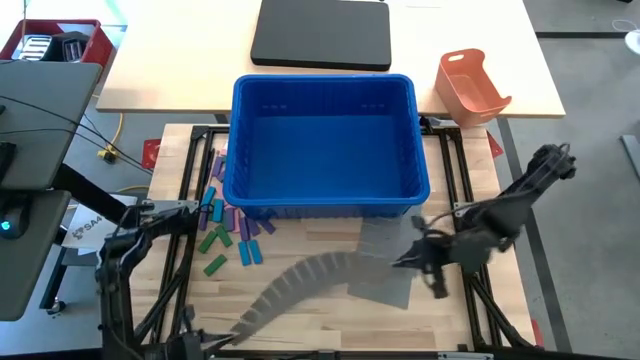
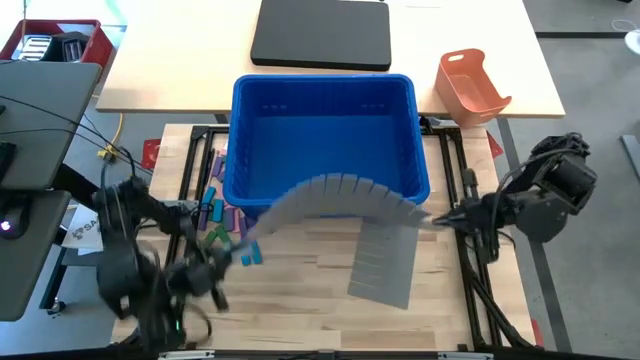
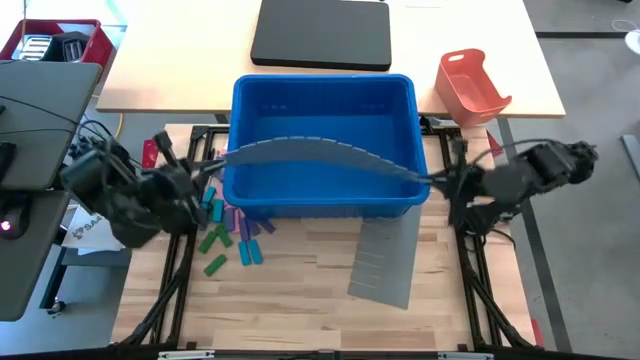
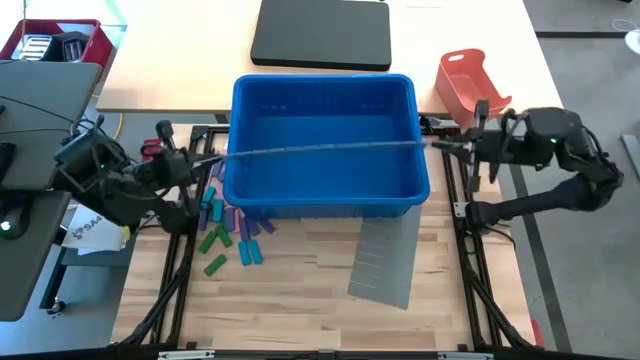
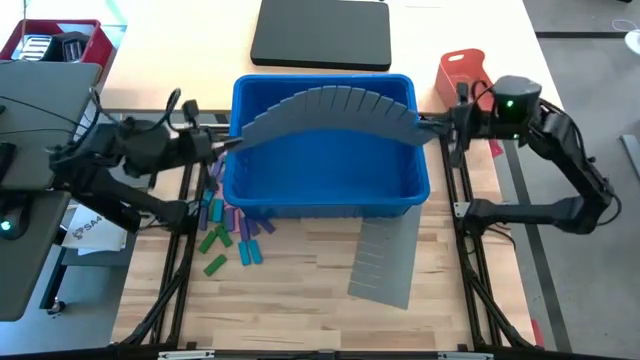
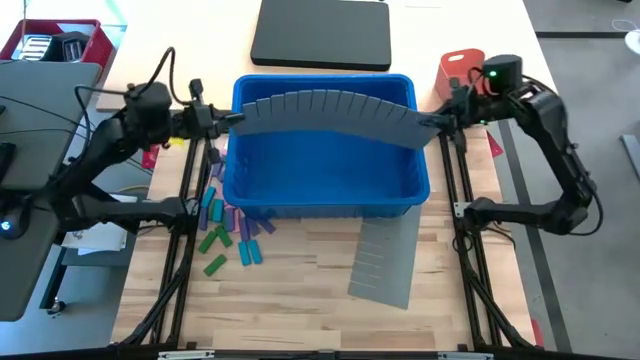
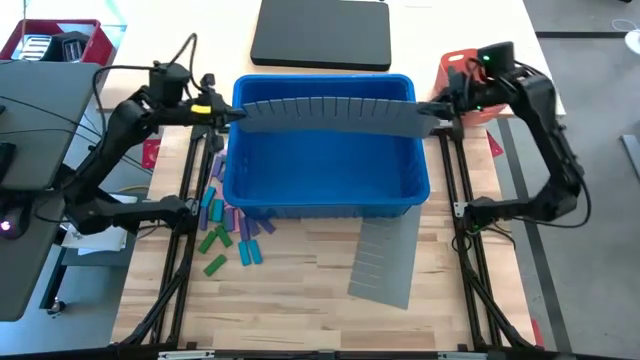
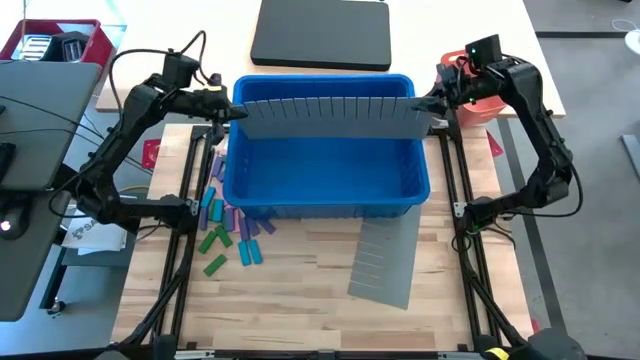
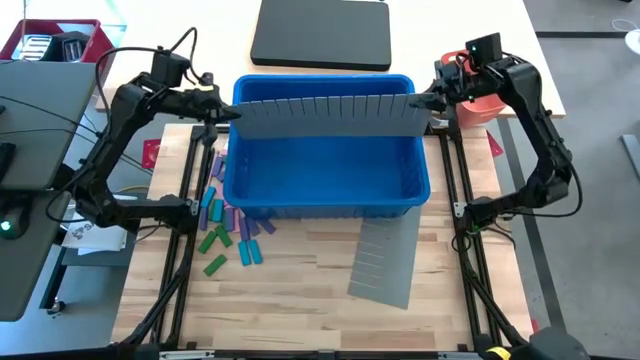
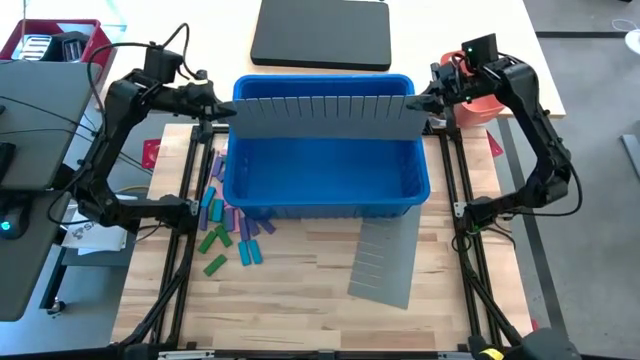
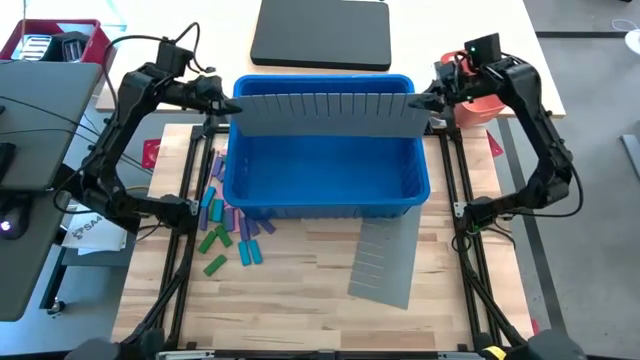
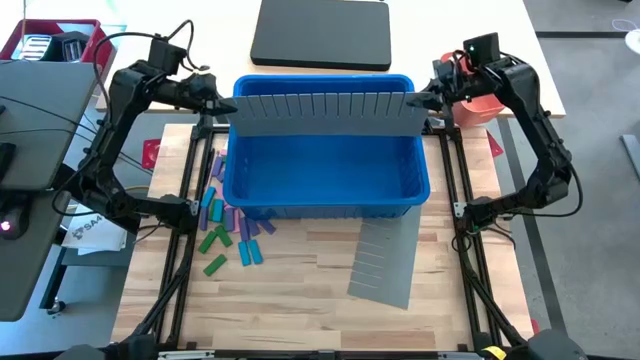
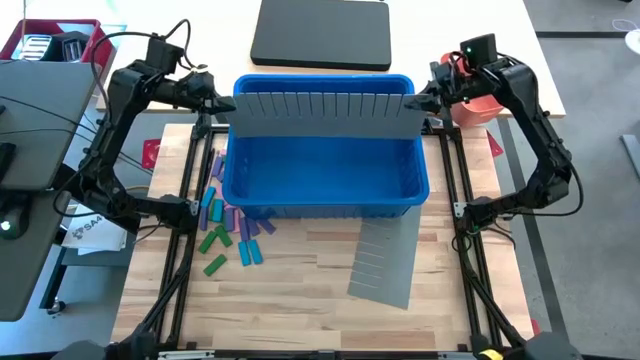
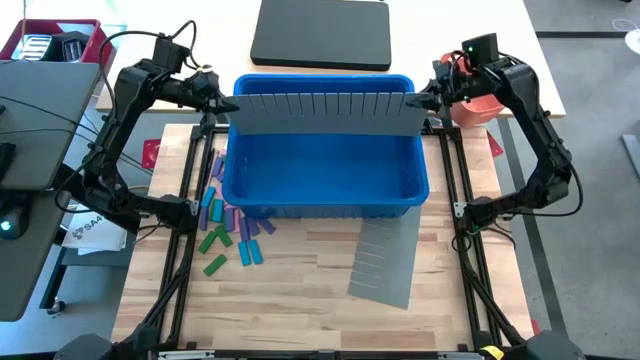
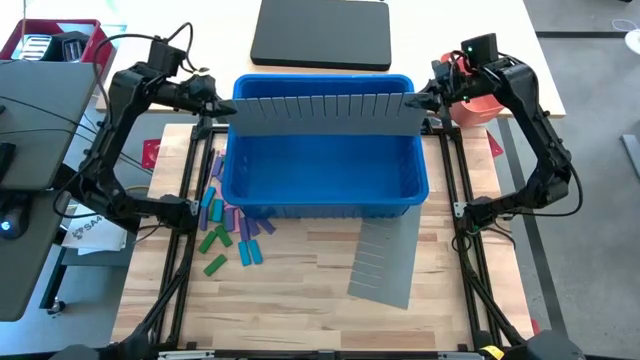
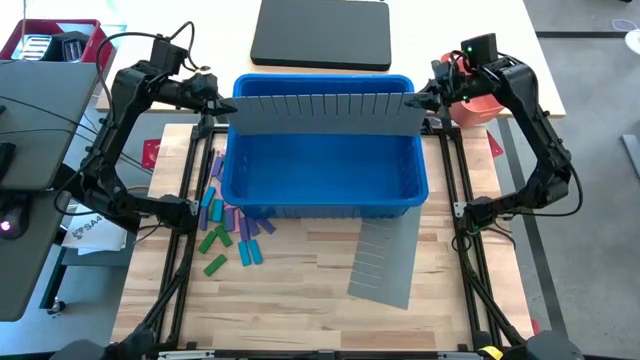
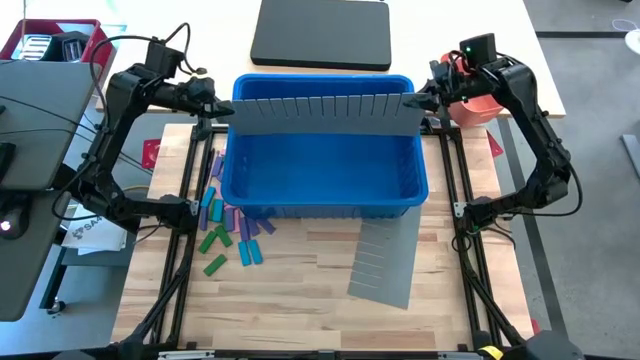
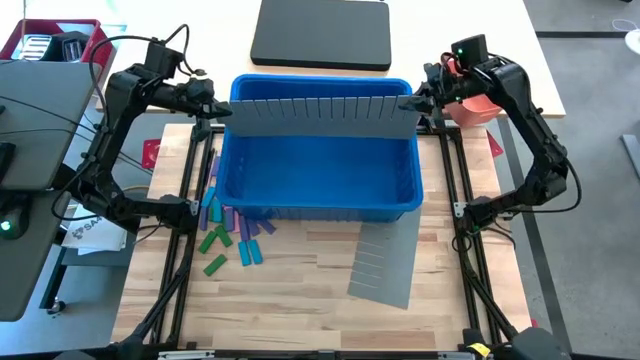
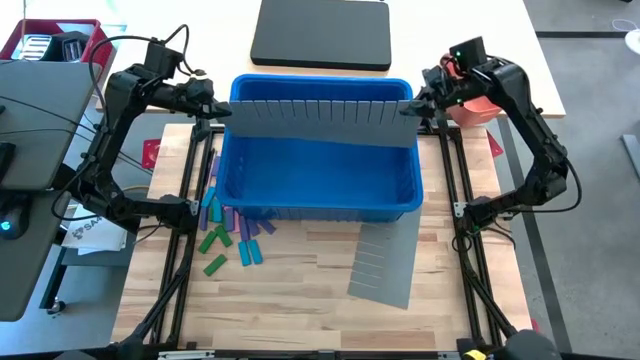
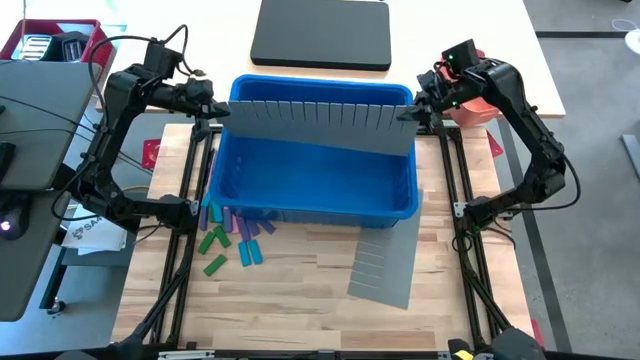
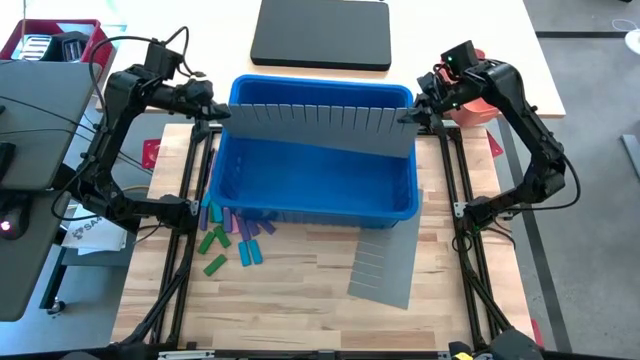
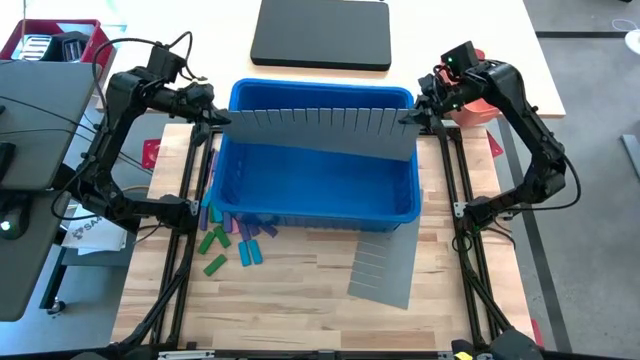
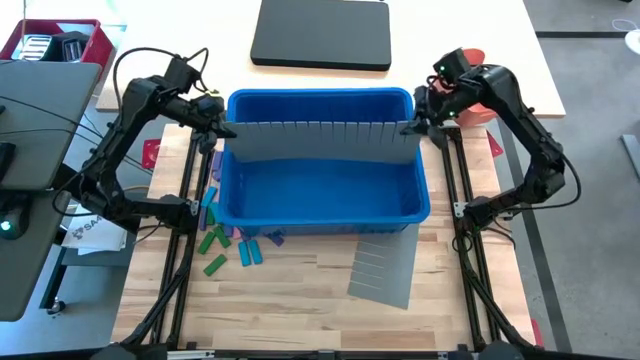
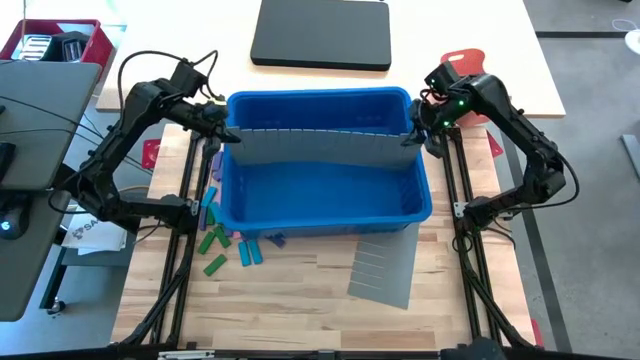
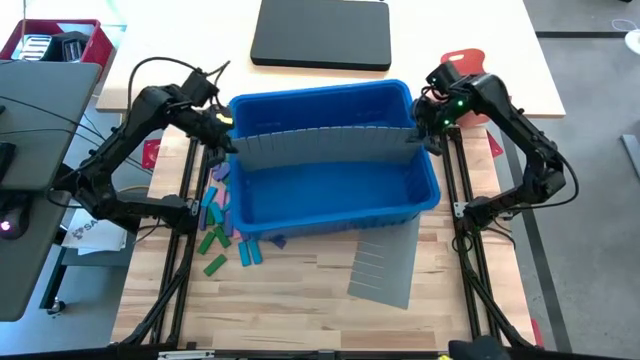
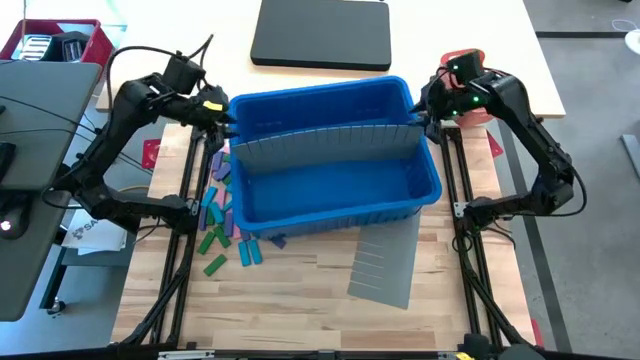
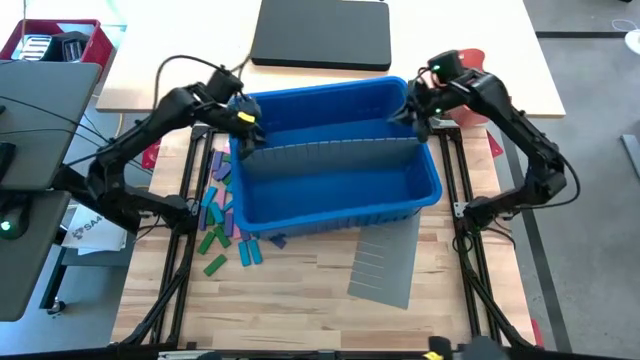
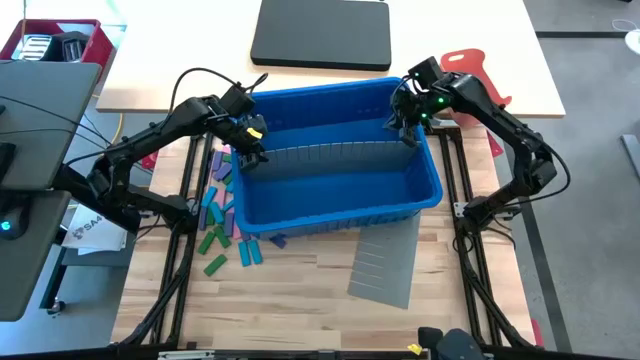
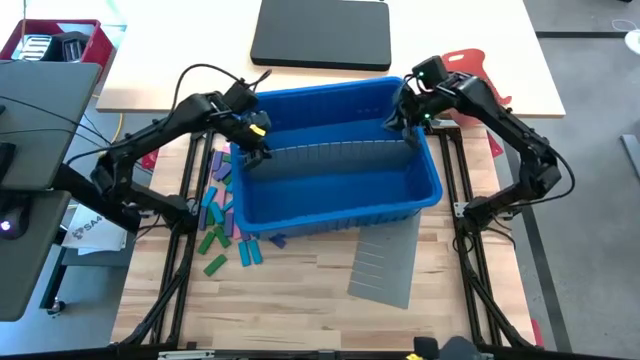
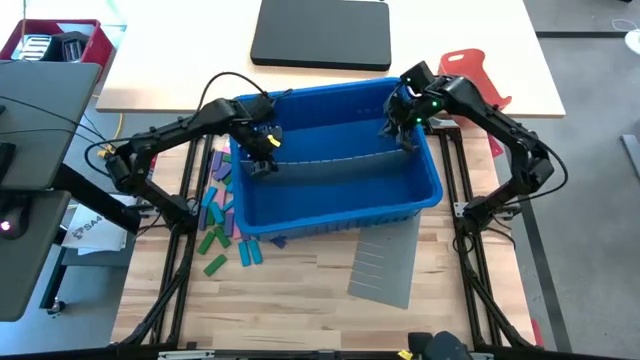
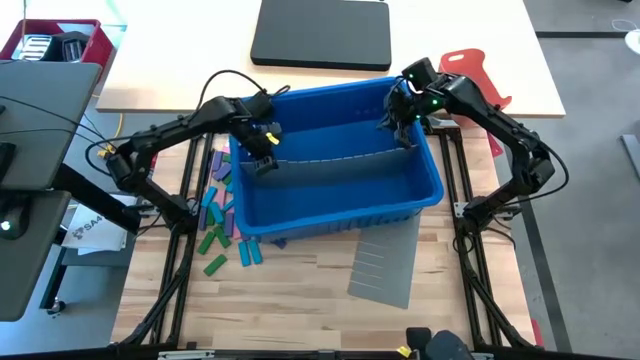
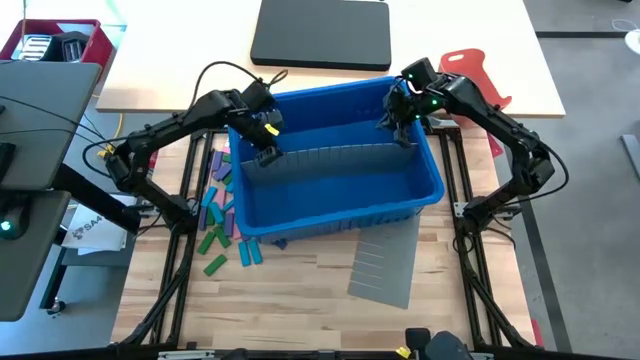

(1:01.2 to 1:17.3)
Task: Sort blocks
Insert the bin divider into the blue bin
